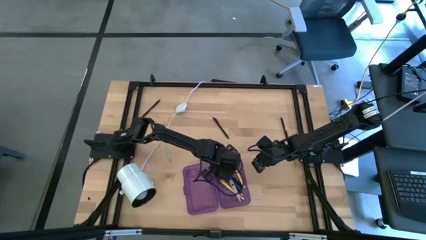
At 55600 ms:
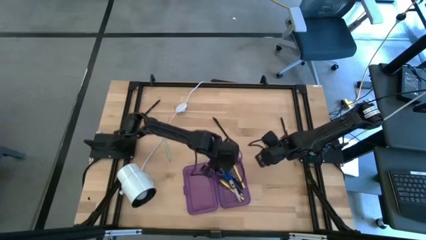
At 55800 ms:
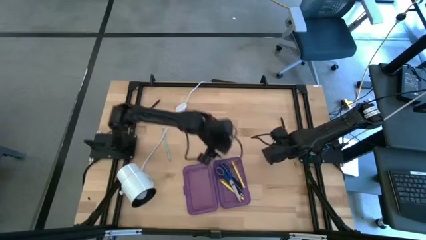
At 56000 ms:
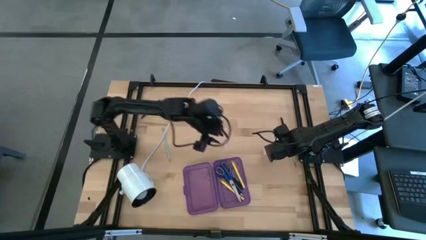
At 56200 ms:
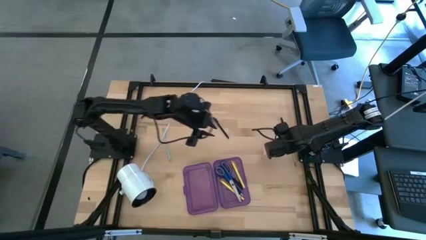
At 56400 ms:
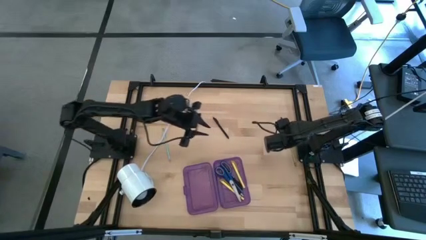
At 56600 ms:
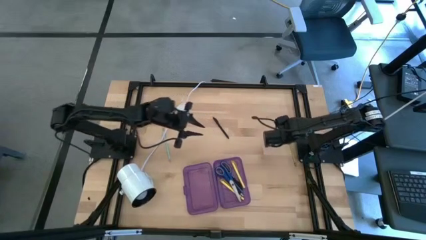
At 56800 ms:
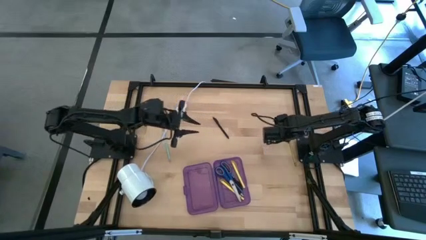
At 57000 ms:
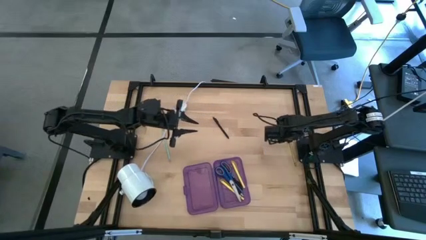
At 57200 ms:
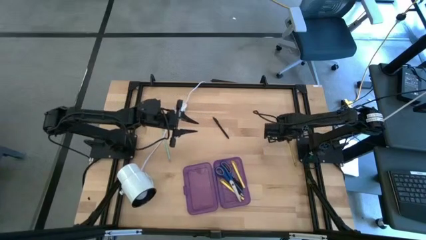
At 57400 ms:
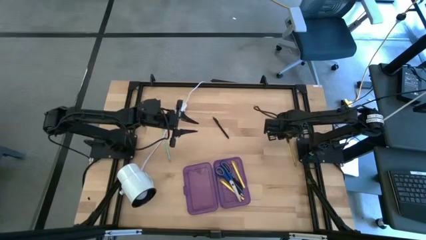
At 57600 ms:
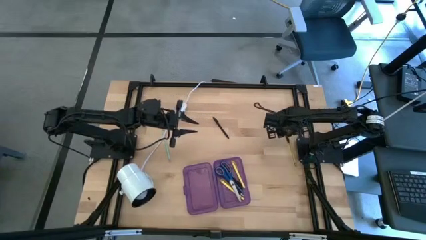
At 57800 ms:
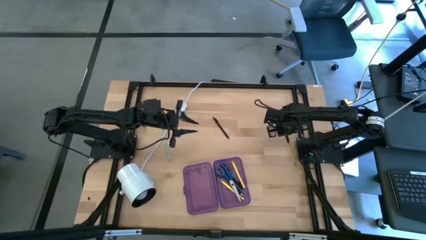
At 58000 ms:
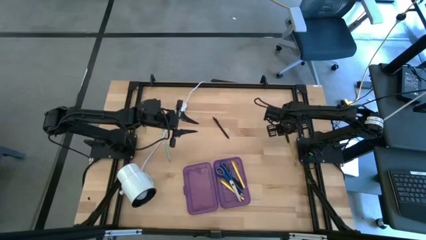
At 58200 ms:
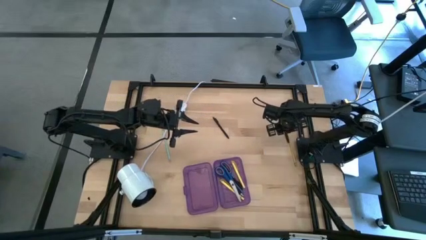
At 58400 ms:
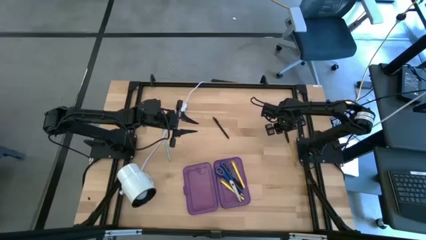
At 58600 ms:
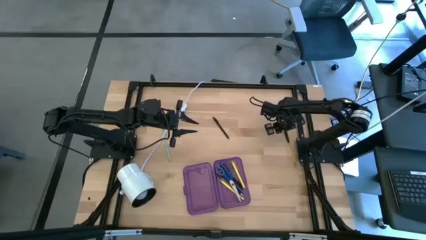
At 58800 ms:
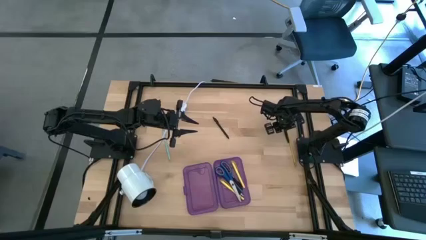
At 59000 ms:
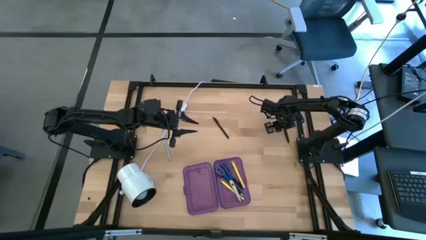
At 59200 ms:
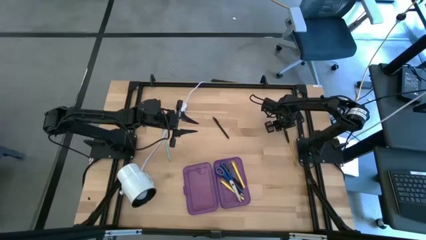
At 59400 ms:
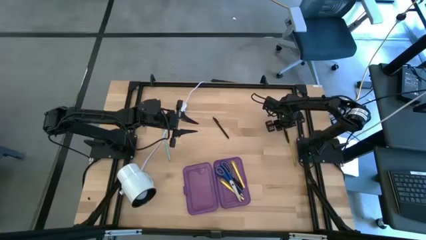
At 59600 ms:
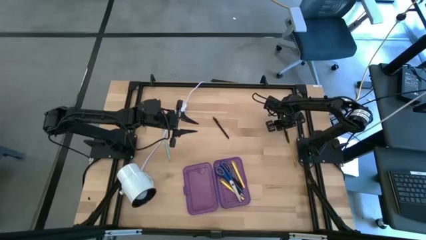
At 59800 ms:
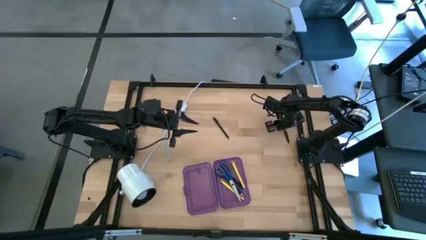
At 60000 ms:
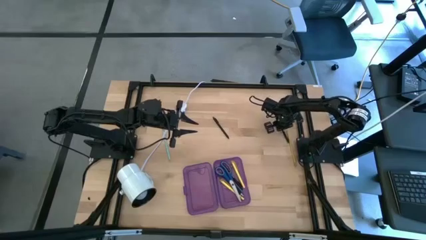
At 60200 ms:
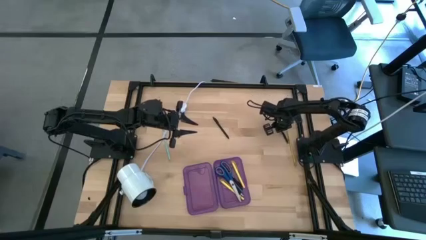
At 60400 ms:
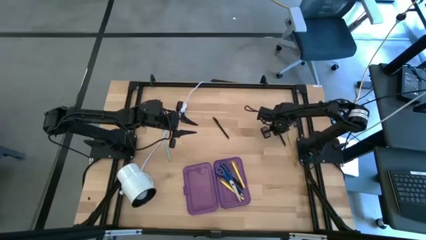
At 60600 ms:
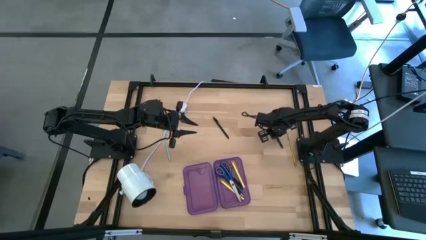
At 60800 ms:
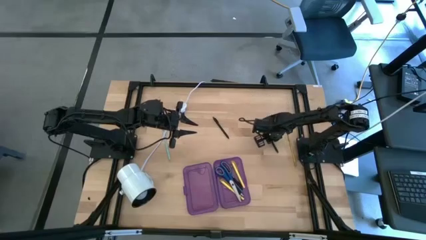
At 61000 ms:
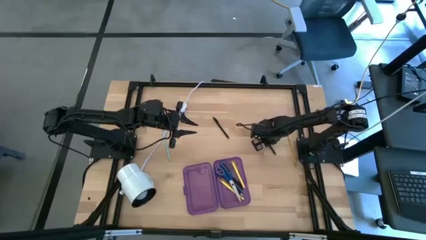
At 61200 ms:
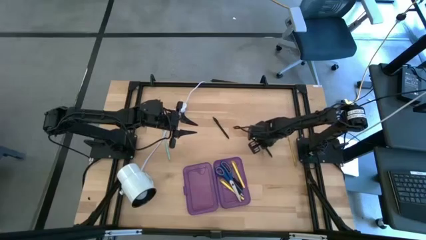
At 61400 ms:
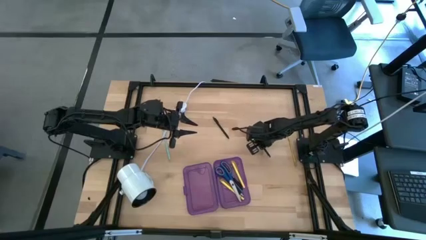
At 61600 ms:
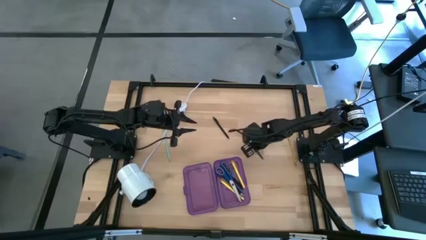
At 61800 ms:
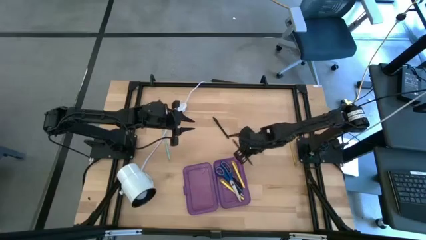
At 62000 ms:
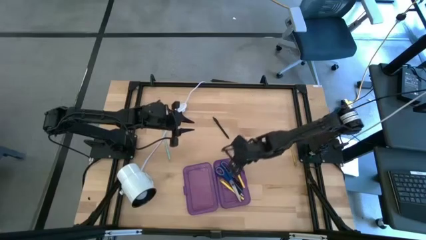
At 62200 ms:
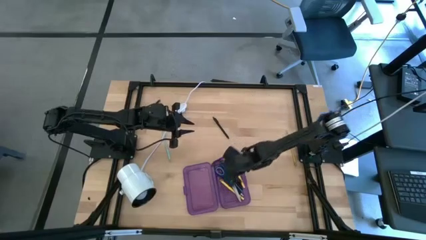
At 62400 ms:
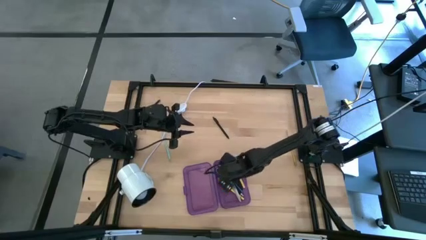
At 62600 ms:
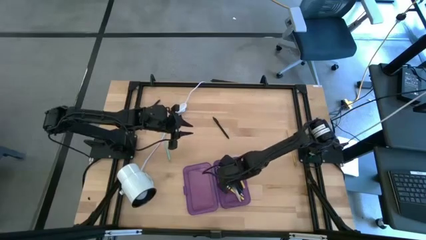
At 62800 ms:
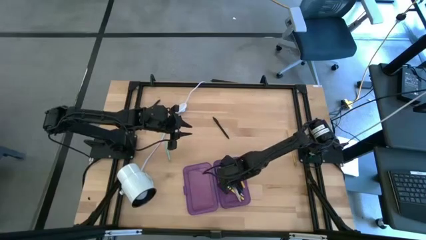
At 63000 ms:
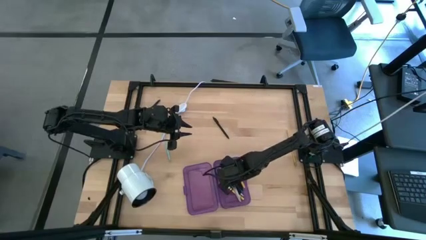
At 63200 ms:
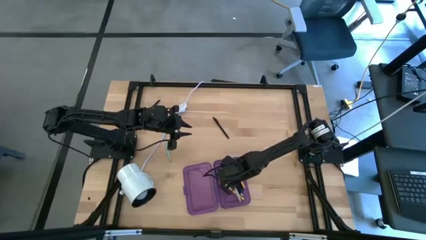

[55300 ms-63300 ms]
Task: Pick & place school supplies into a supply box
Put the black pen into the purple supply box

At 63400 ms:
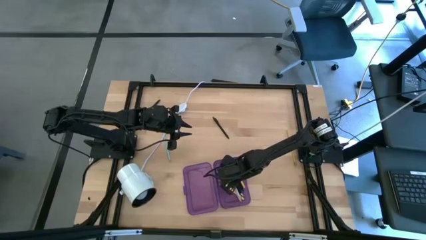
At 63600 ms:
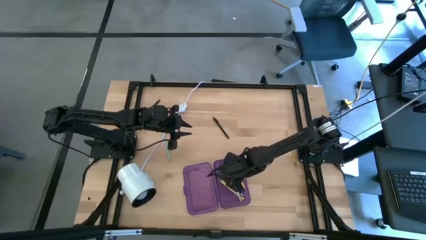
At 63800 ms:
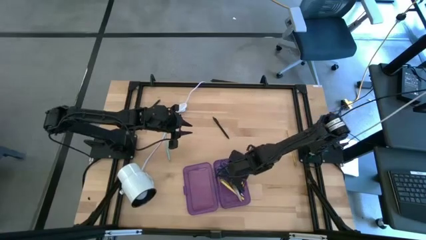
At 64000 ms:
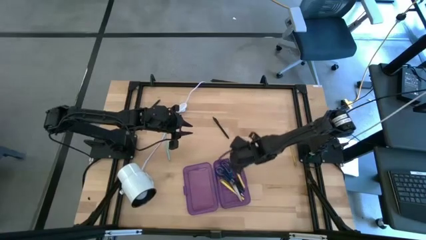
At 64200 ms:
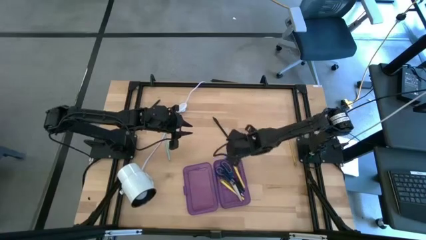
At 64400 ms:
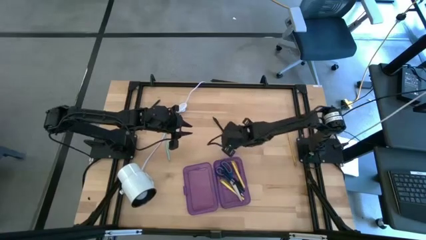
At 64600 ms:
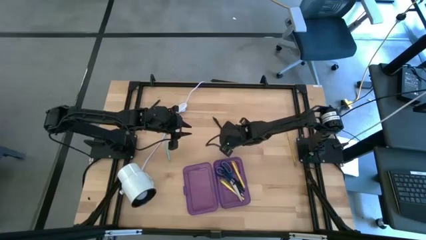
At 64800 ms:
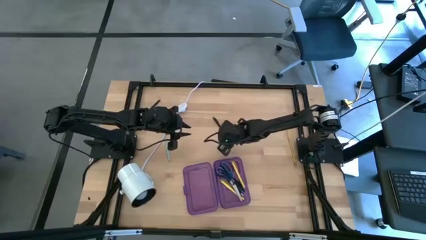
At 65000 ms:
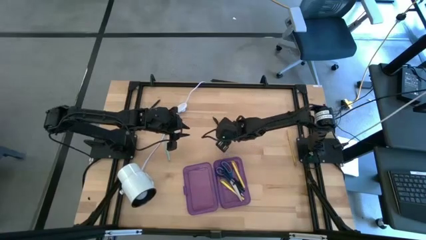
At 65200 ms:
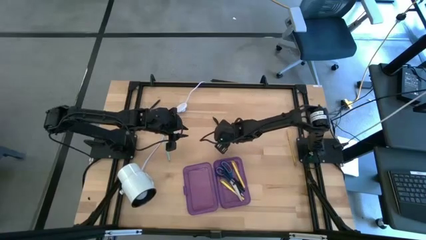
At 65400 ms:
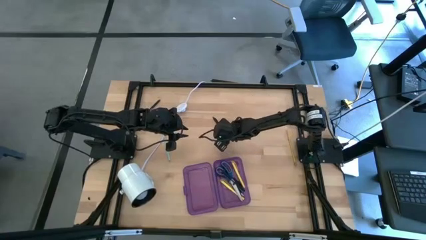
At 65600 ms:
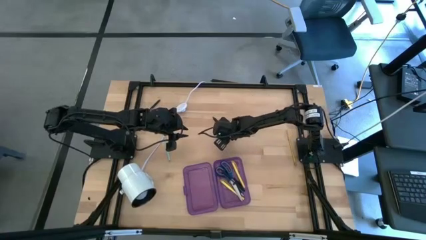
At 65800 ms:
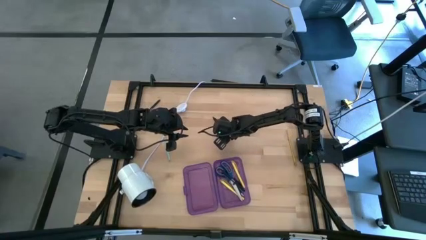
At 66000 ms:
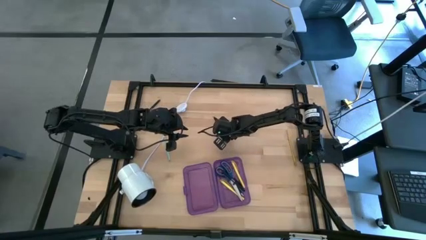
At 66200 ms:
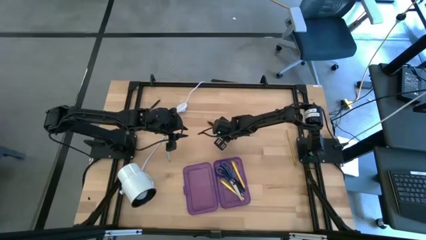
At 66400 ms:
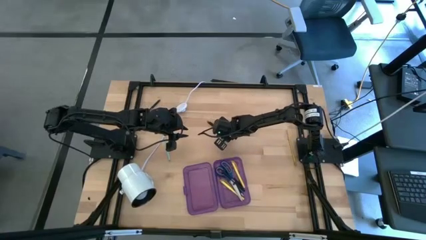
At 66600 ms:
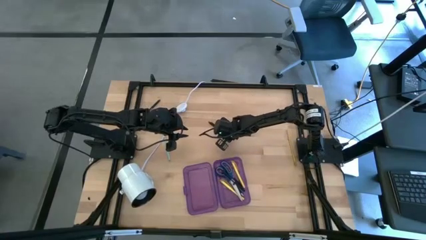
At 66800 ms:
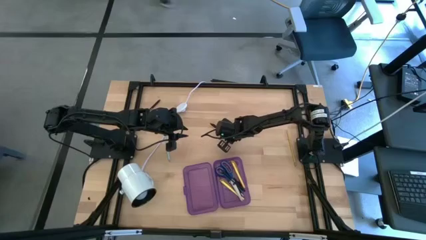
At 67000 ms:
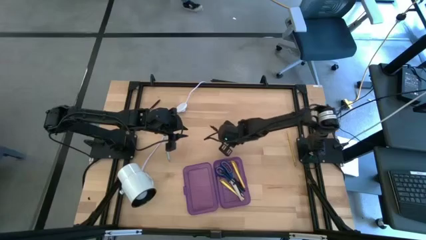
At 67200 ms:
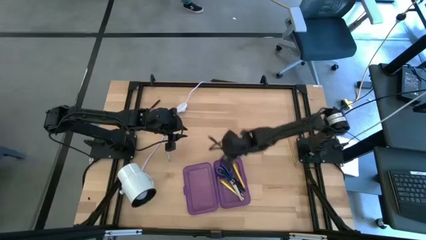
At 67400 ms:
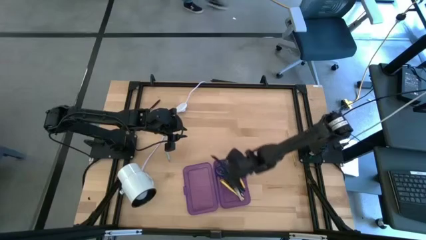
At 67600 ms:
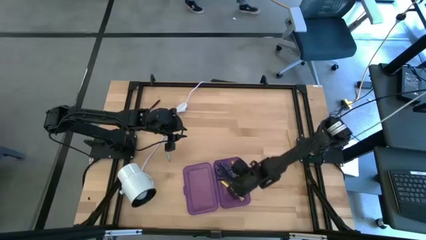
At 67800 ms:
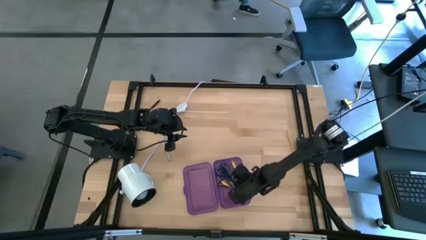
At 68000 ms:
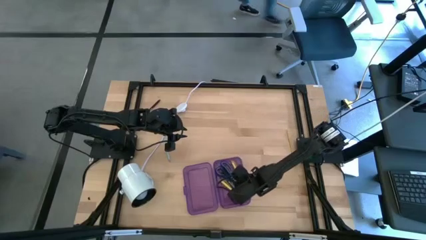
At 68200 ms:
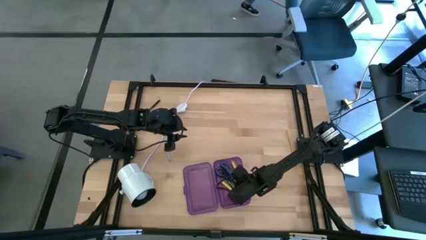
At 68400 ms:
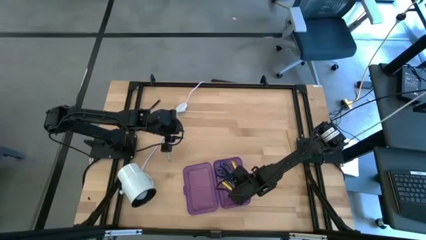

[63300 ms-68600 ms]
Put the black pen into the purple supply box

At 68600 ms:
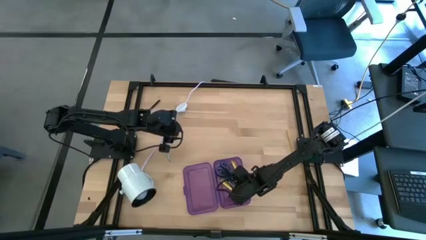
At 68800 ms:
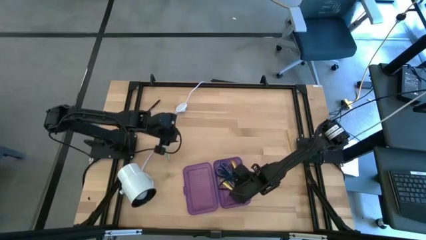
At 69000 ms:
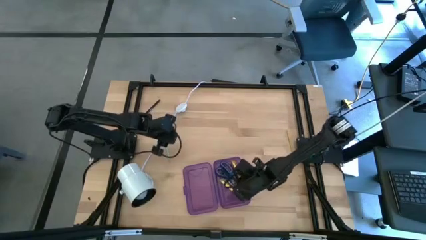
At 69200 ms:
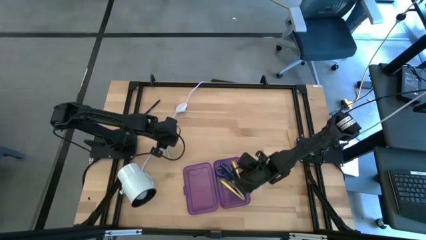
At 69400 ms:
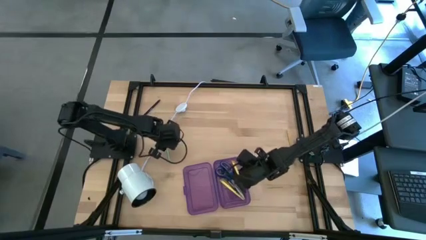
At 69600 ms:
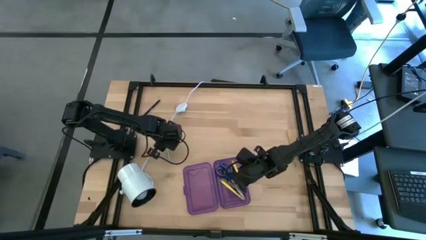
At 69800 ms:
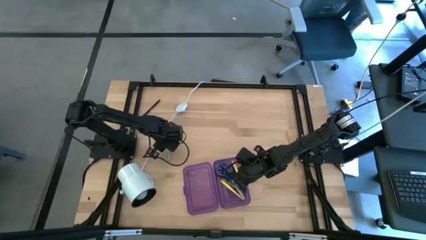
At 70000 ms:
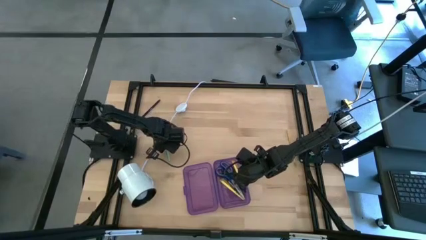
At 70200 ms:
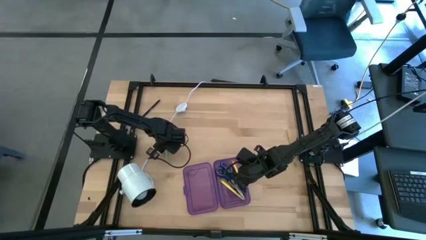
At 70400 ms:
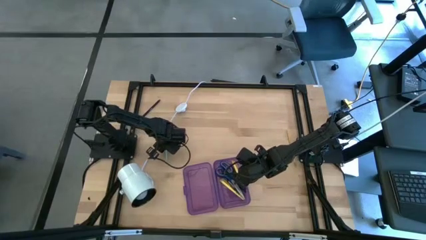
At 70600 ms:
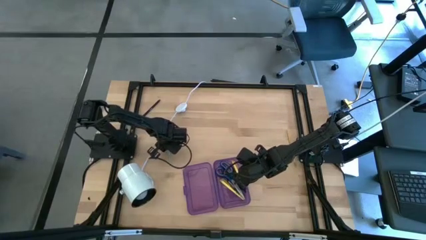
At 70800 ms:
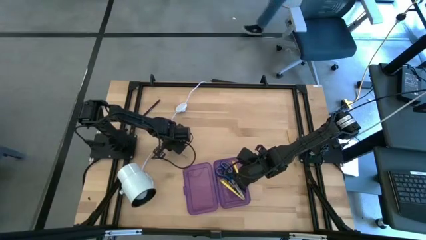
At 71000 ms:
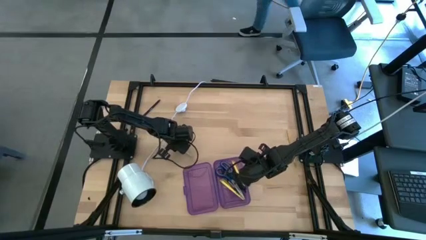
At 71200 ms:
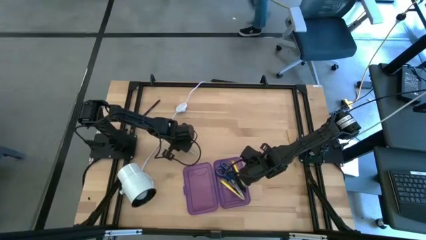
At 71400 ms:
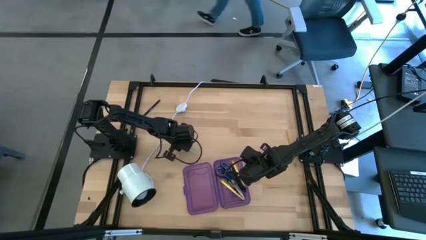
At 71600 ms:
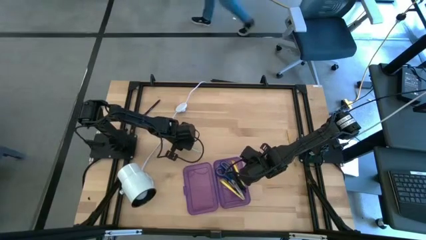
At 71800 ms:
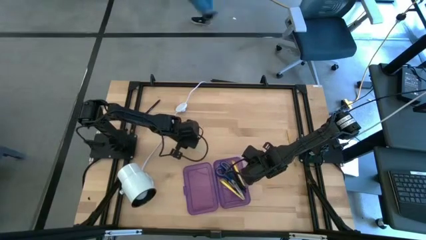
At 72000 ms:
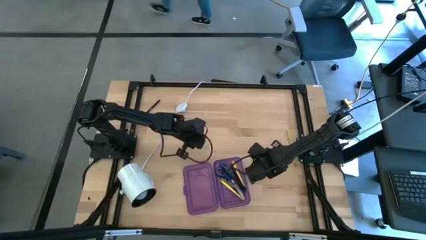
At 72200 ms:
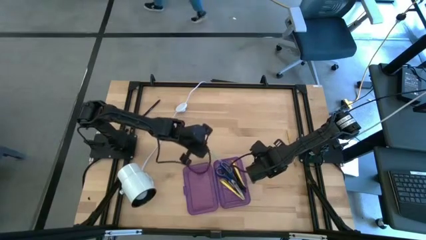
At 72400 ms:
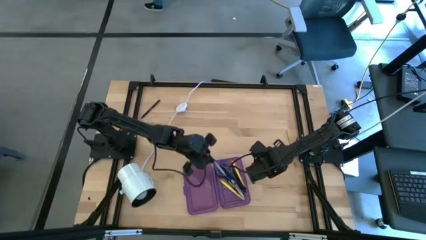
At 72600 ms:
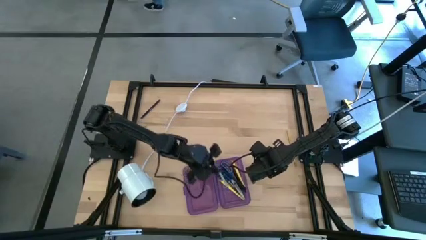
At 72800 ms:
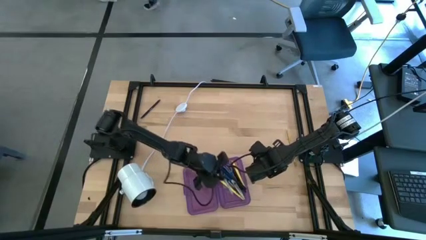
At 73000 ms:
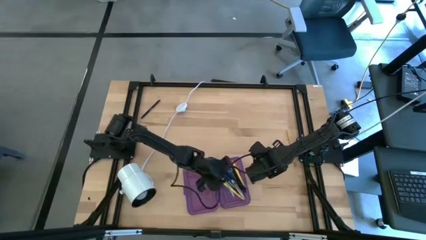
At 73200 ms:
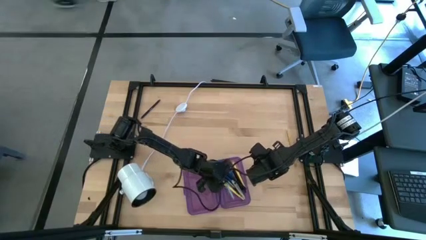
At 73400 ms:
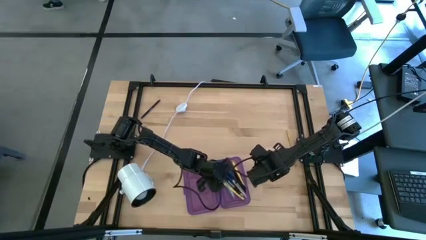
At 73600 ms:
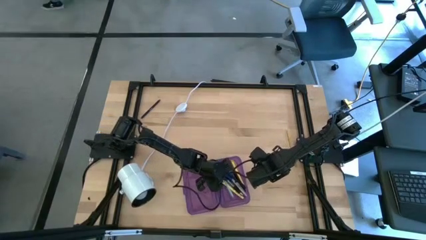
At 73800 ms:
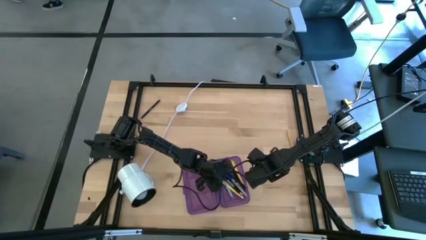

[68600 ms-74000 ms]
Put the light blue pencil into the purple supply box
